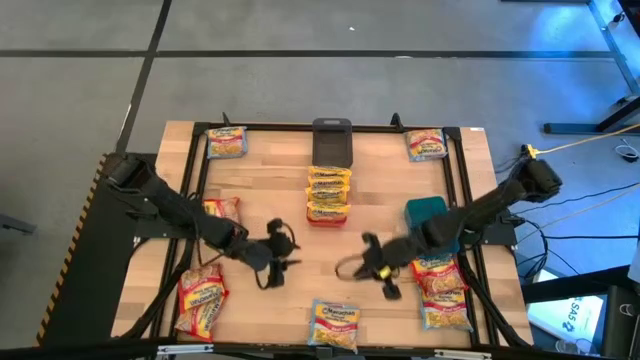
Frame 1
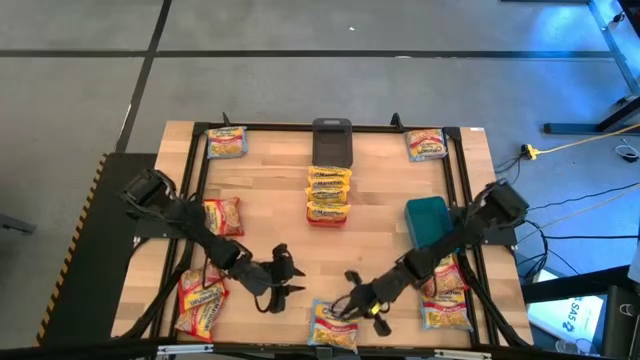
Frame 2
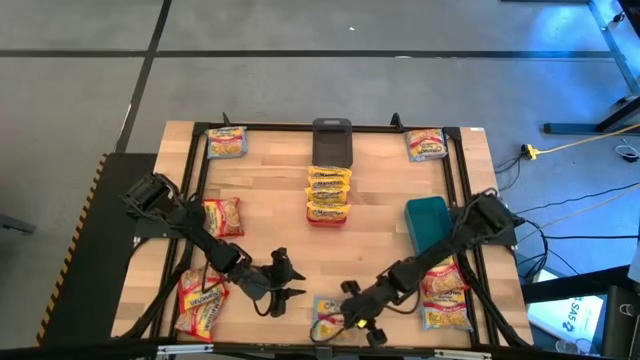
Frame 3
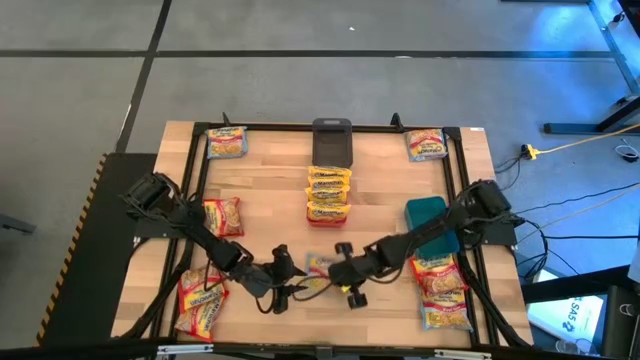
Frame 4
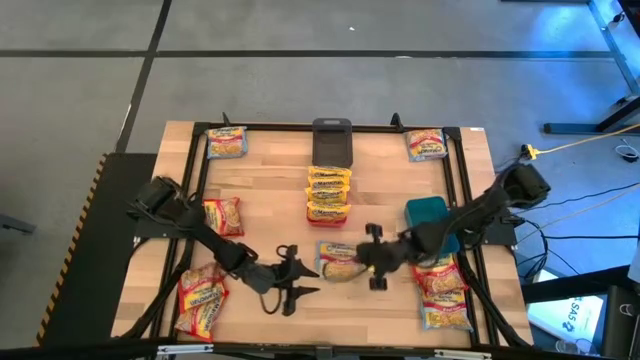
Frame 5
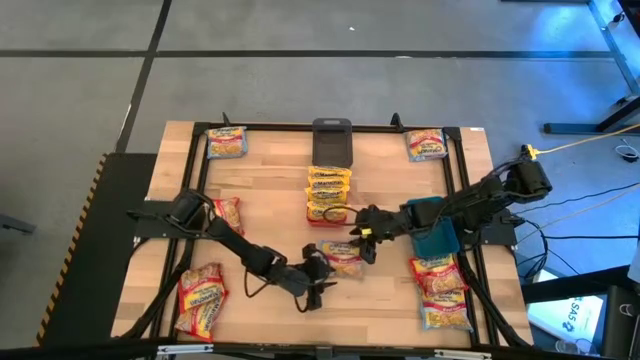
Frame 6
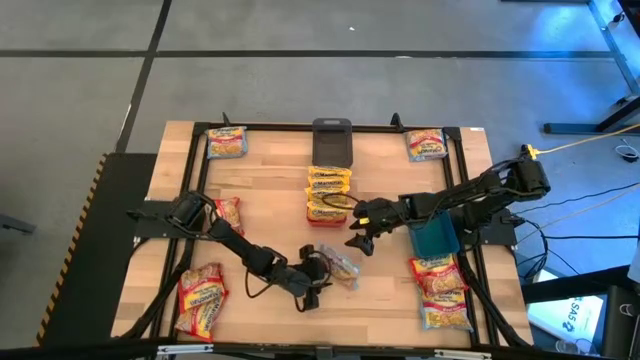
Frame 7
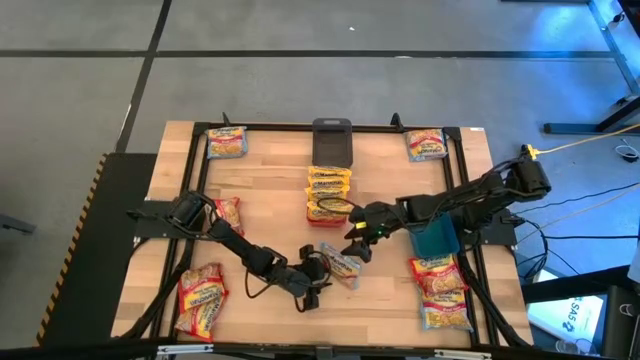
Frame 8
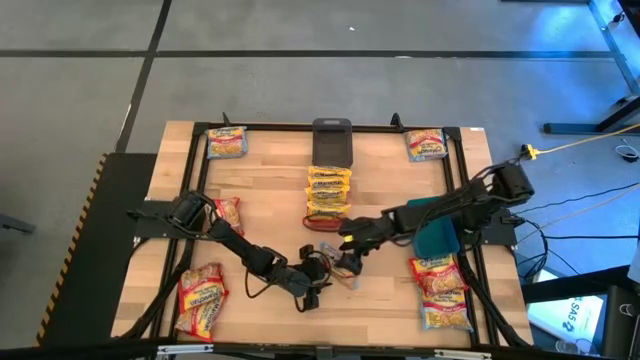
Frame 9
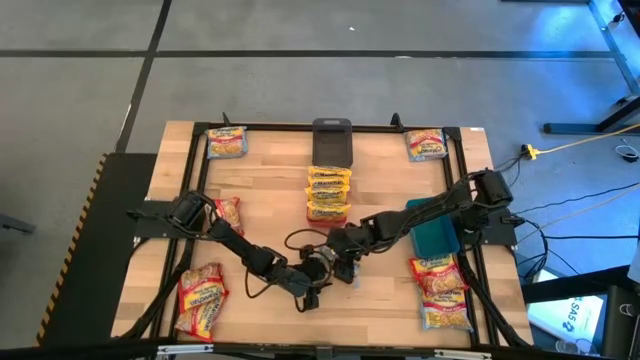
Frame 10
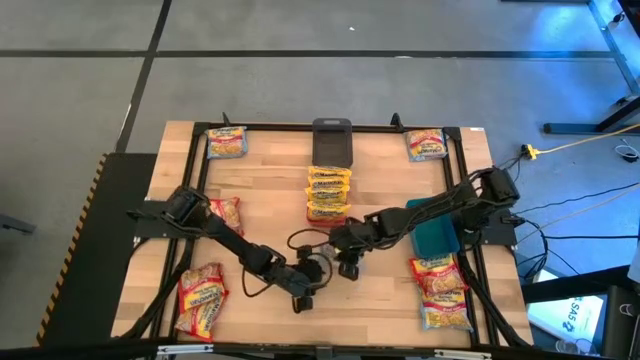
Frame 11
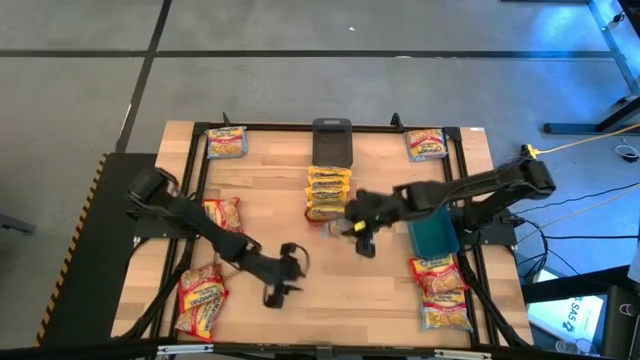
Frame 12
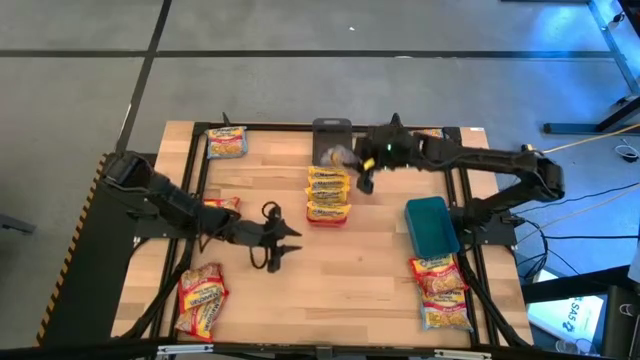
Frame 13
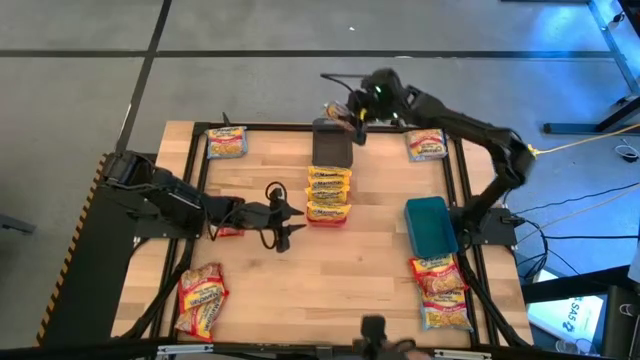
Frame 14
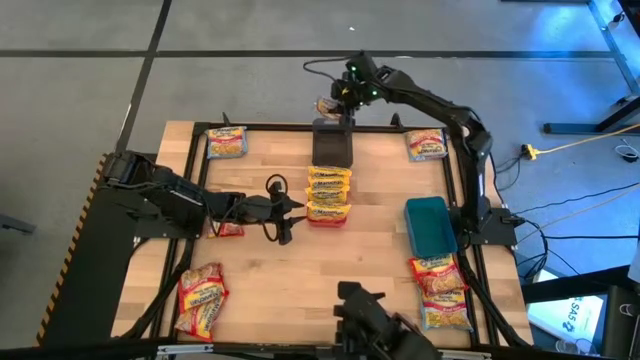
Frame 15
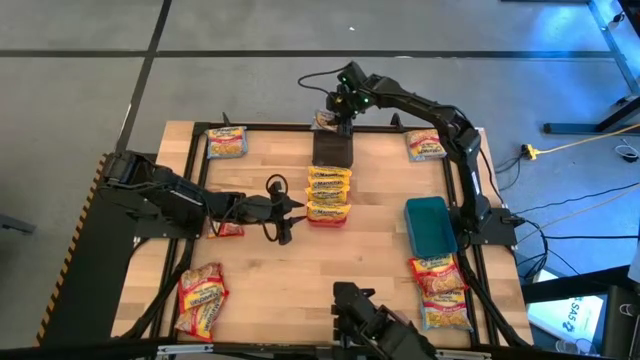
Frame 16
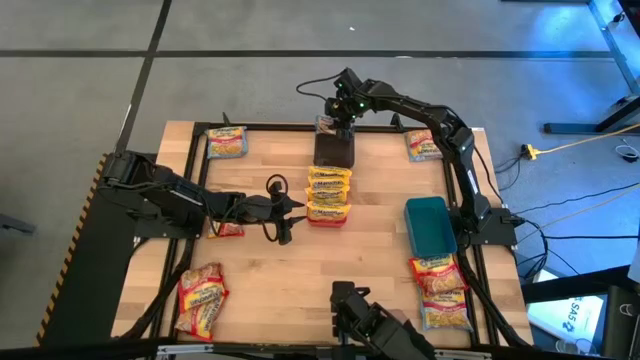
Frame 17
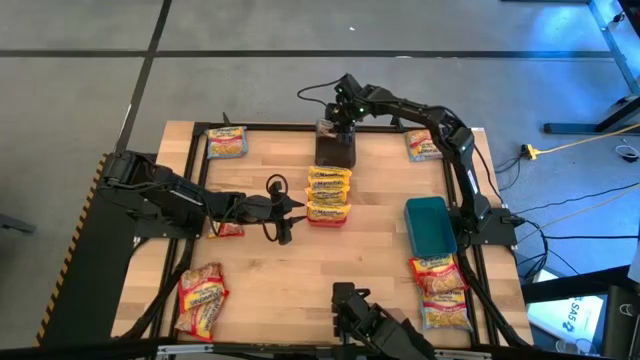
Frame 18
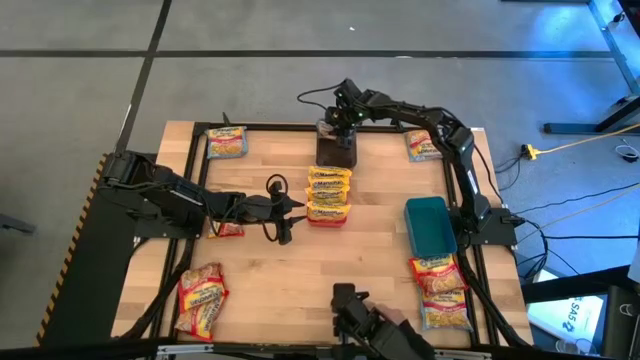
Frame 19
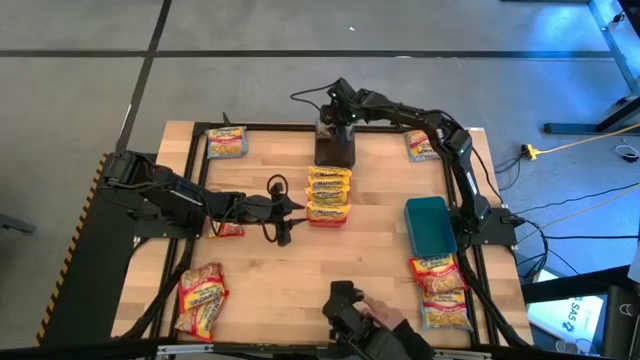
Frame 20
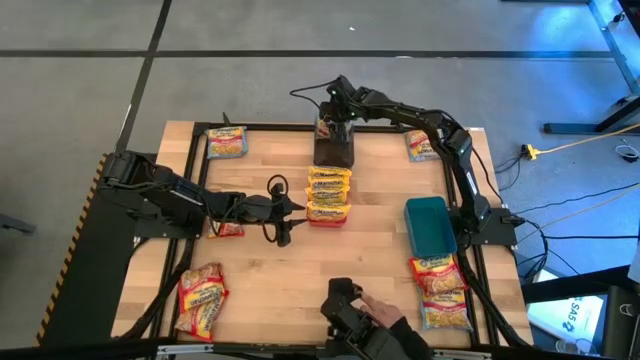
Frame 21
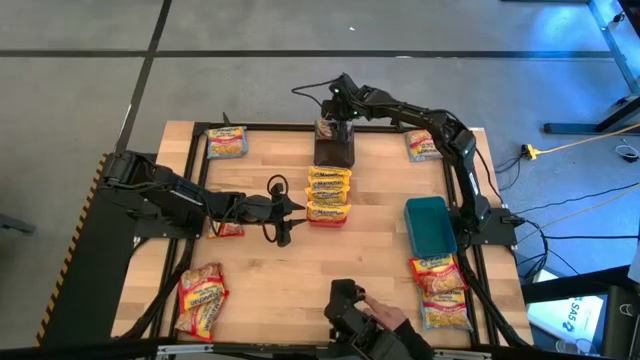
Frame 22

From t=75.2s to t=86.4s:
Task: Sort Maruchan noodles
Put the blue noodle pack into the black bin

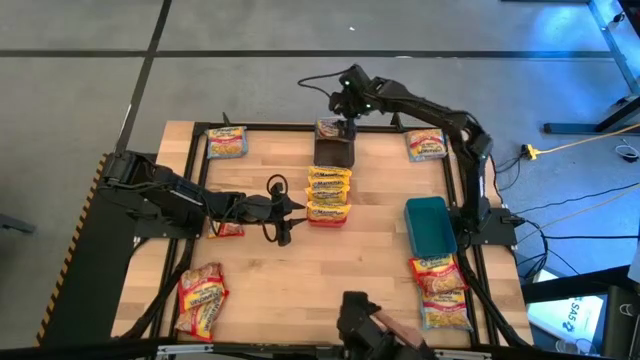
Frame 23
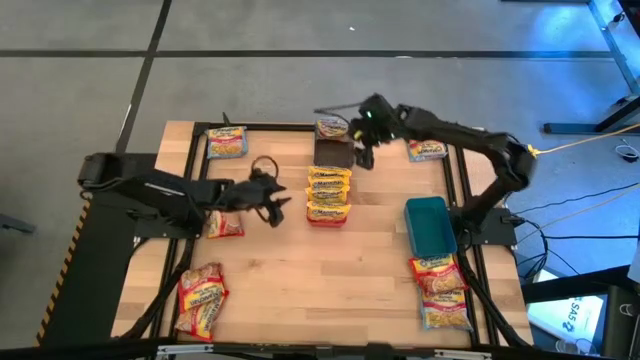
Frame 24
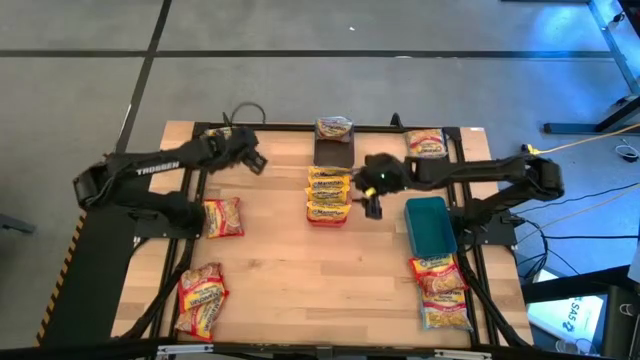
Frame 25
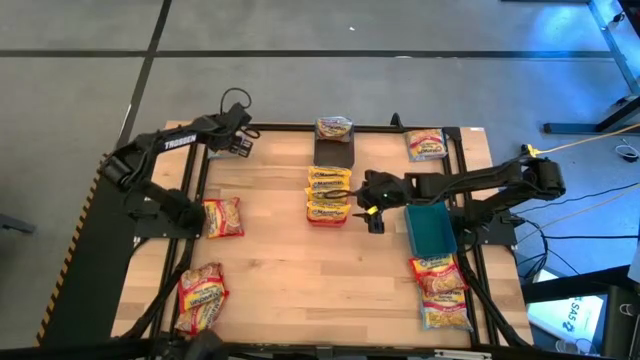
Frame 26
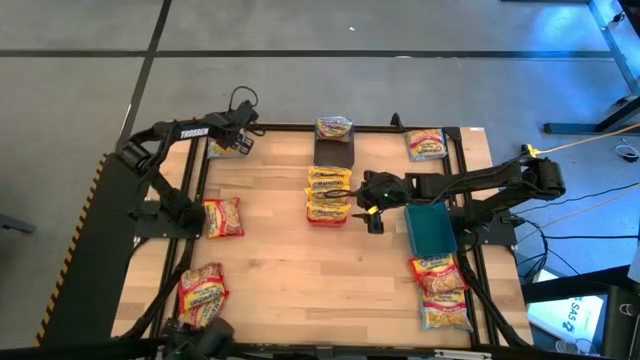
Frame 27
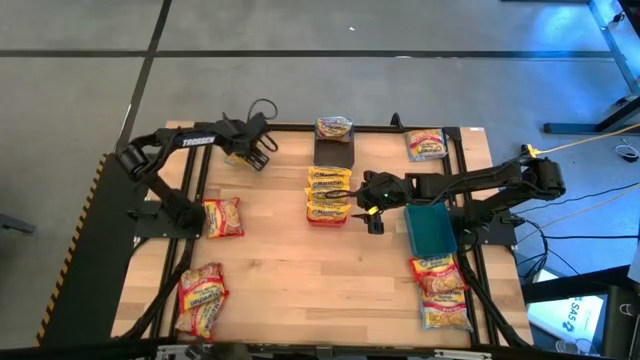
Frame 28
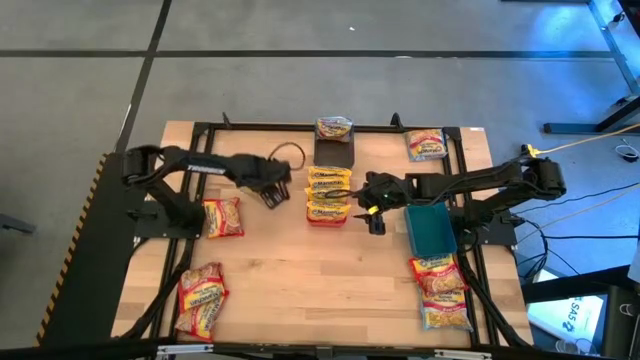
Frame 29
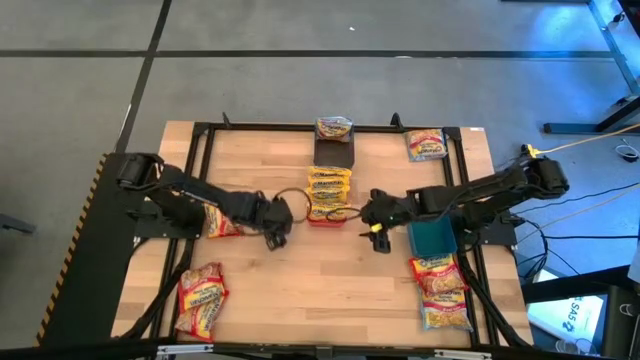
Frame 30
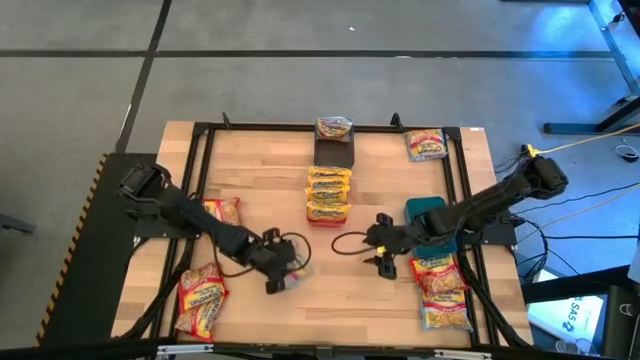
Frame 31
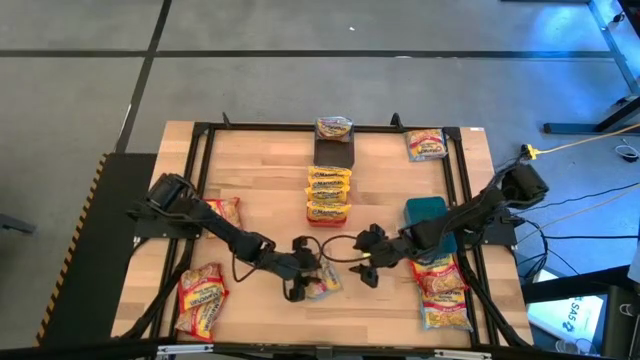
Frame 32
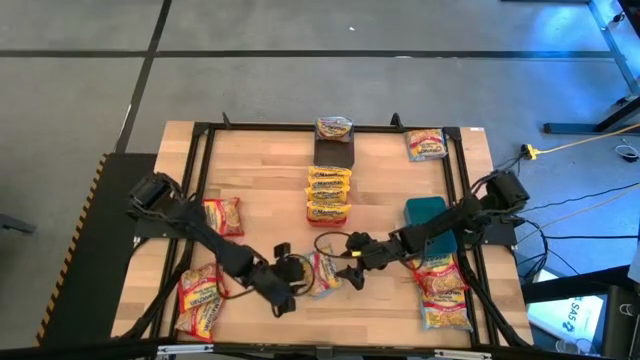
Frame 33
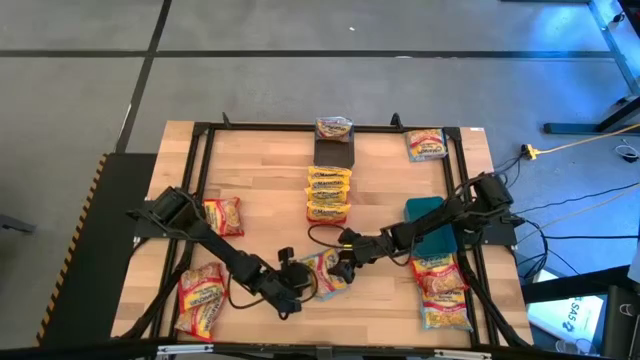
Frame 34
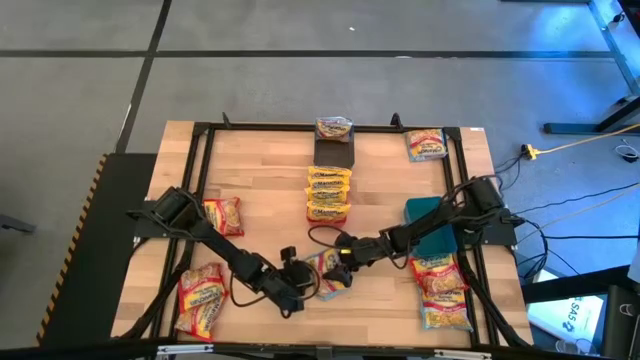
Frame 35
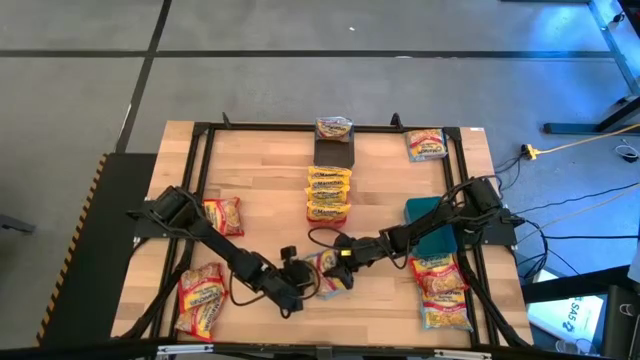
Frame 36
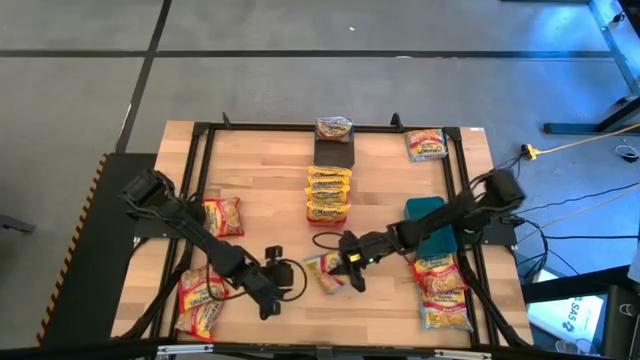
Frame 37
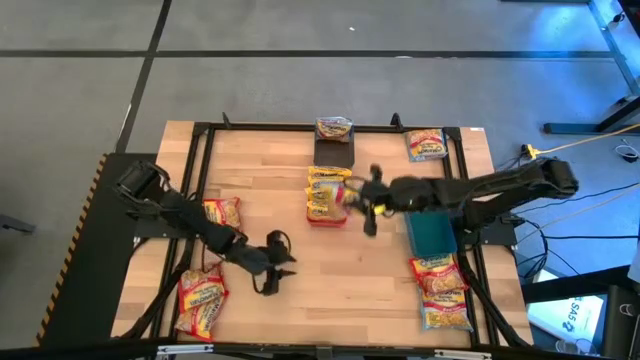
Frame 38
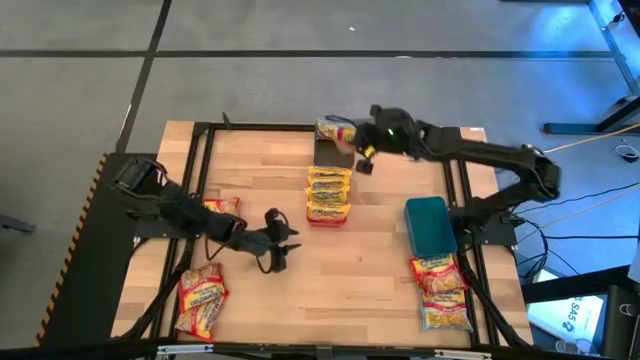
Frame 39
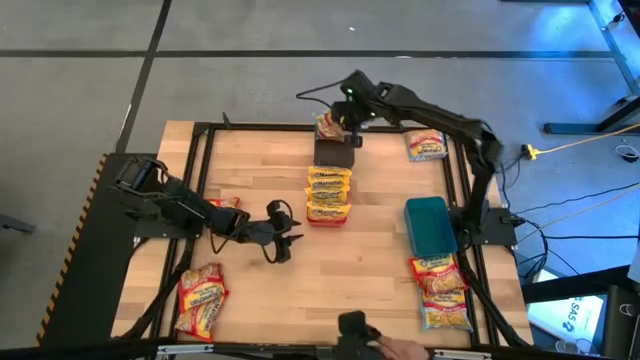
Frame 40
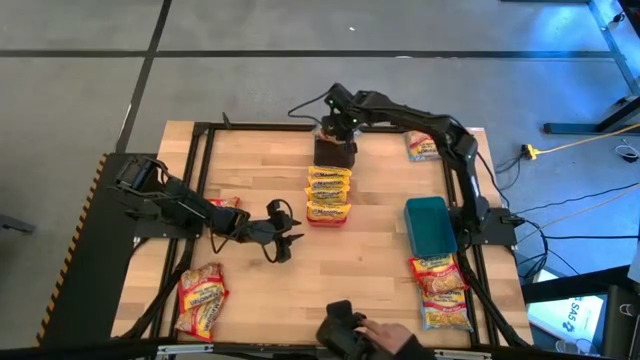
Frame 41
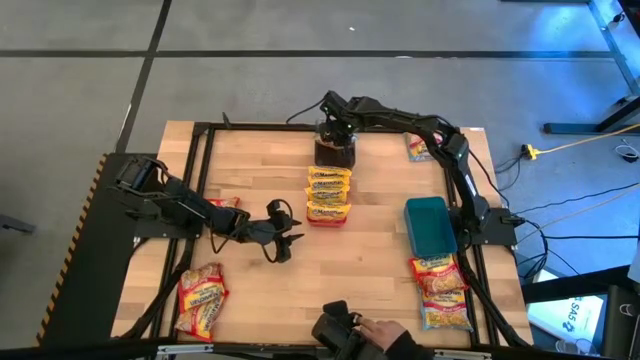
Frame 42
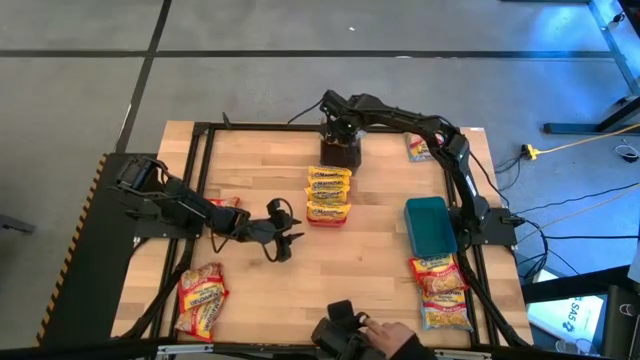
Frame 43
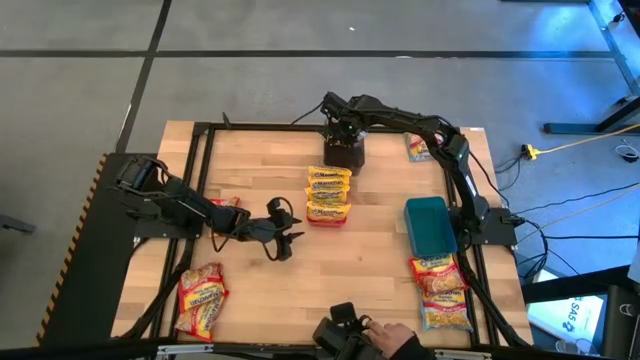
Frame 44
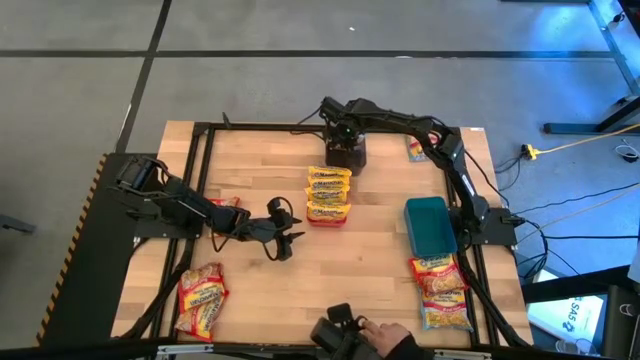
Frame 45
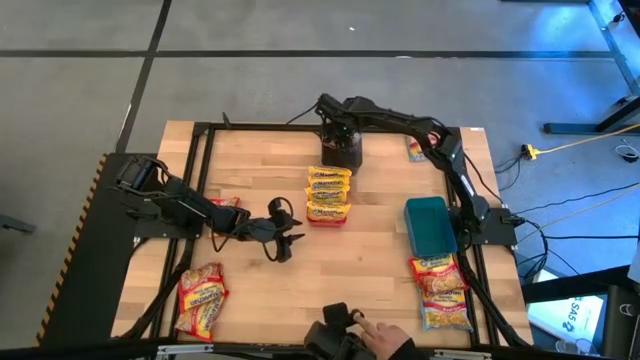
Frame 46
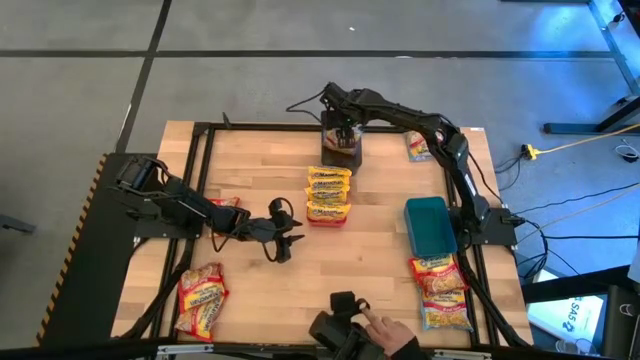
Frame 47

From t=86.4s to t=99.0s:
Put the blue noodle pack into the black bin
